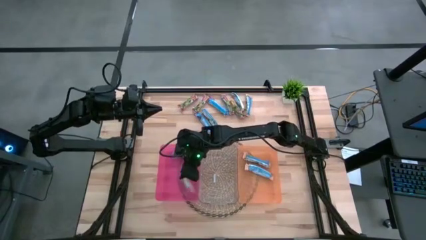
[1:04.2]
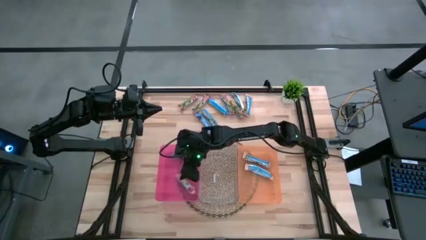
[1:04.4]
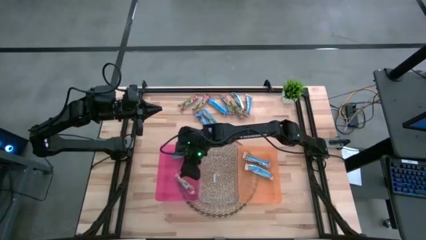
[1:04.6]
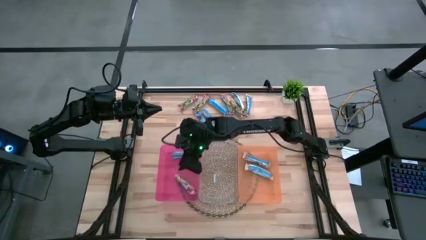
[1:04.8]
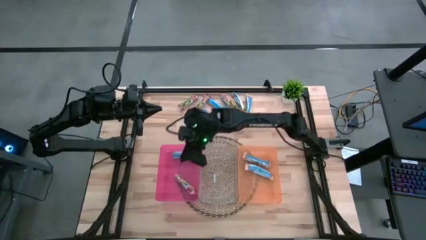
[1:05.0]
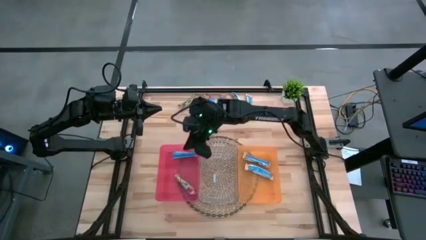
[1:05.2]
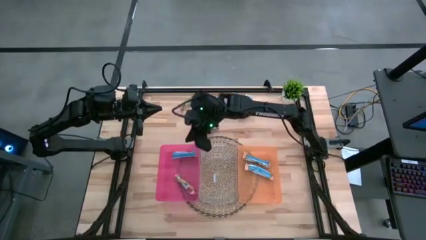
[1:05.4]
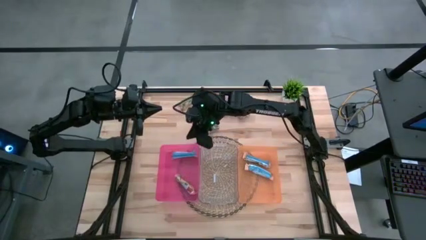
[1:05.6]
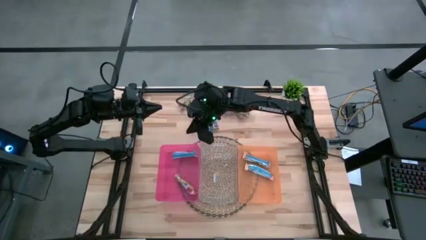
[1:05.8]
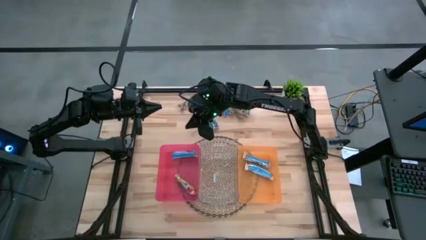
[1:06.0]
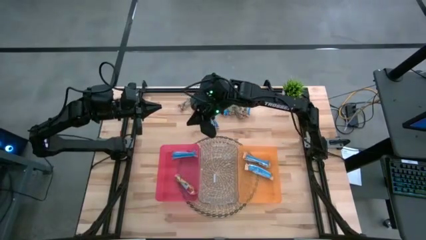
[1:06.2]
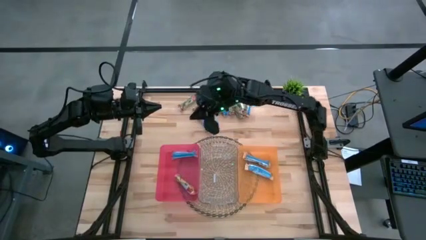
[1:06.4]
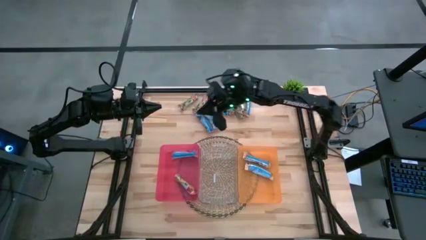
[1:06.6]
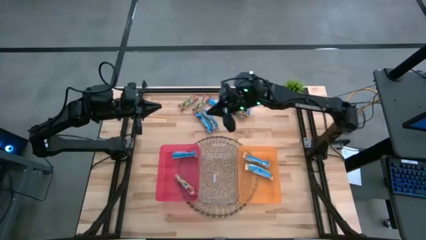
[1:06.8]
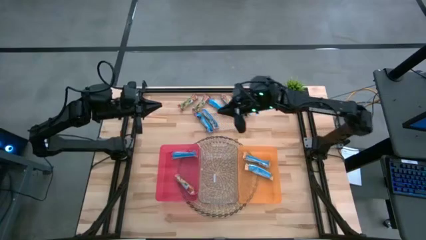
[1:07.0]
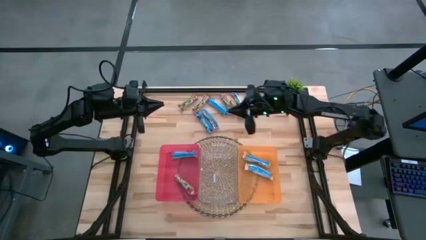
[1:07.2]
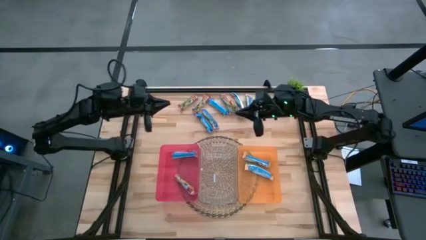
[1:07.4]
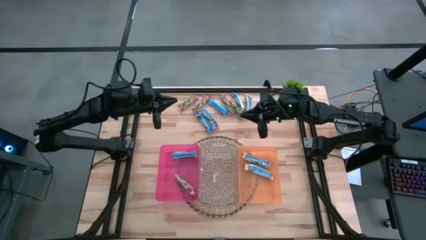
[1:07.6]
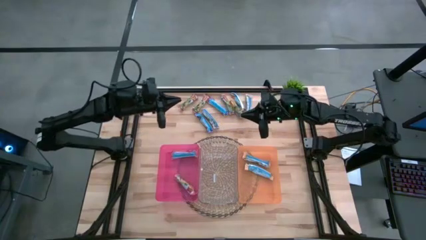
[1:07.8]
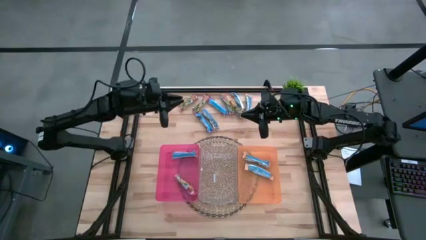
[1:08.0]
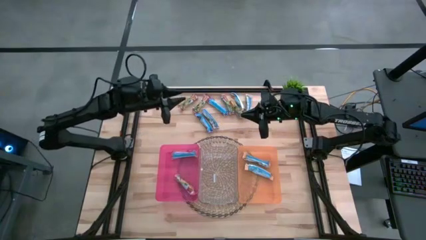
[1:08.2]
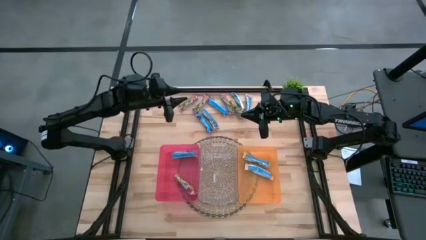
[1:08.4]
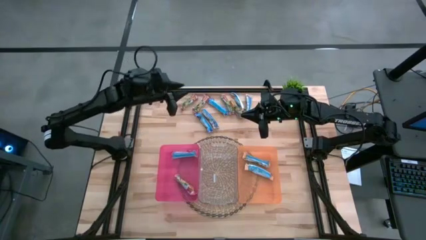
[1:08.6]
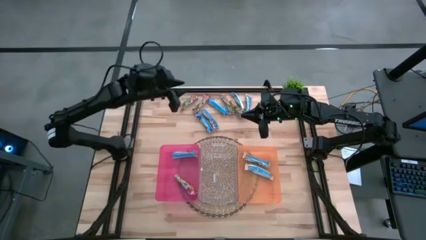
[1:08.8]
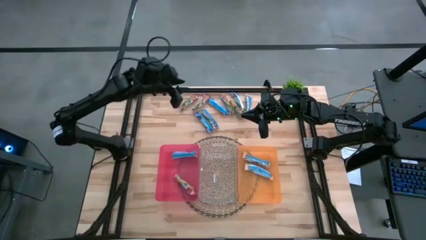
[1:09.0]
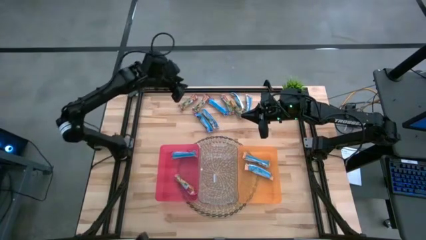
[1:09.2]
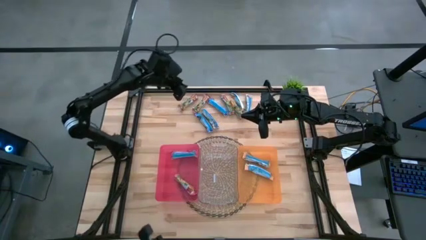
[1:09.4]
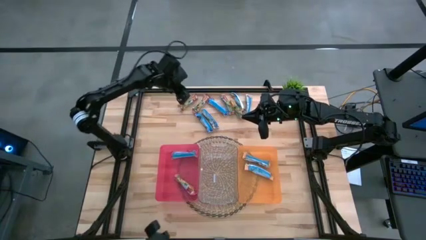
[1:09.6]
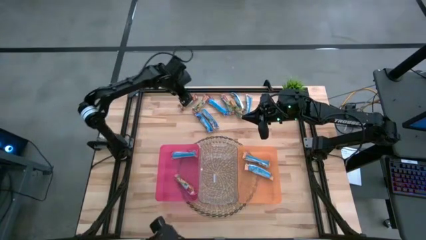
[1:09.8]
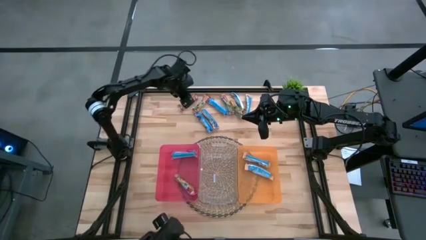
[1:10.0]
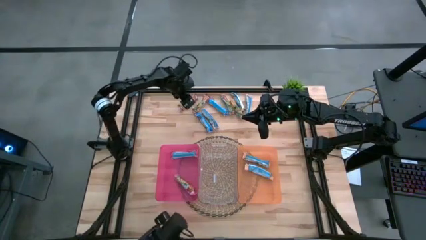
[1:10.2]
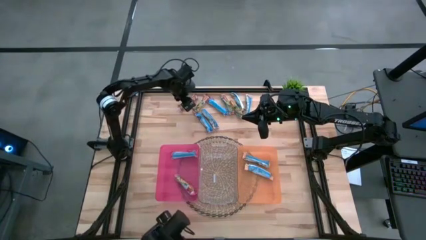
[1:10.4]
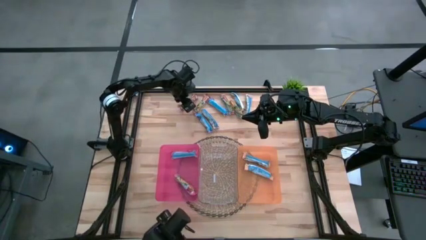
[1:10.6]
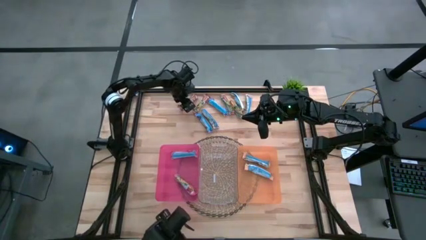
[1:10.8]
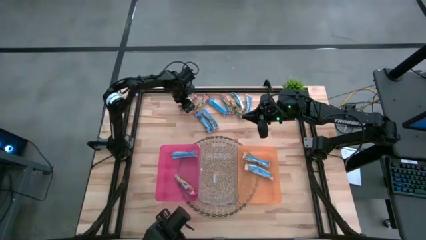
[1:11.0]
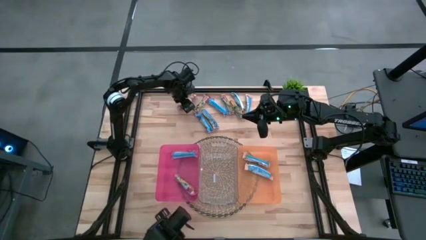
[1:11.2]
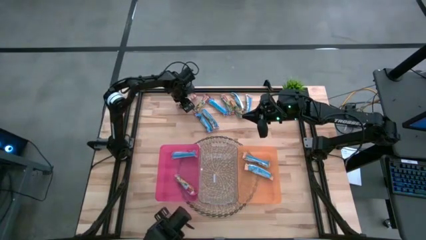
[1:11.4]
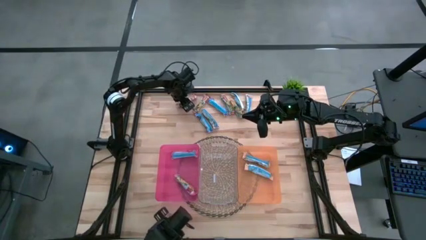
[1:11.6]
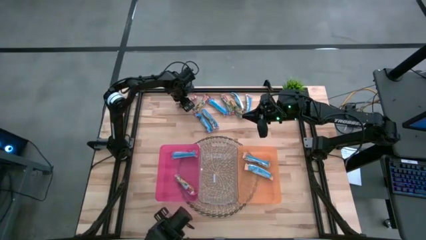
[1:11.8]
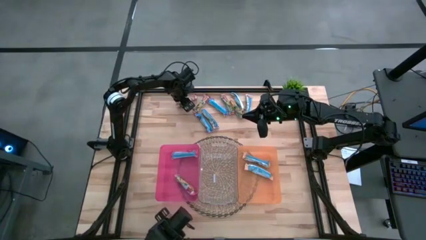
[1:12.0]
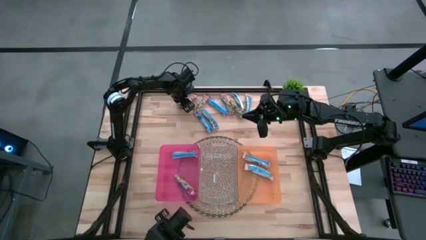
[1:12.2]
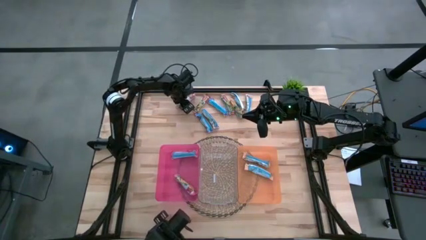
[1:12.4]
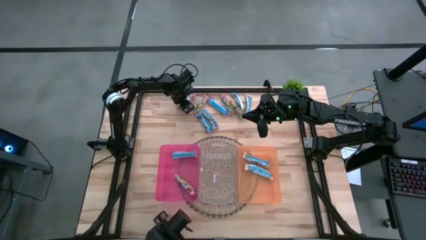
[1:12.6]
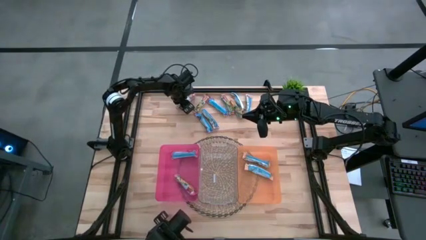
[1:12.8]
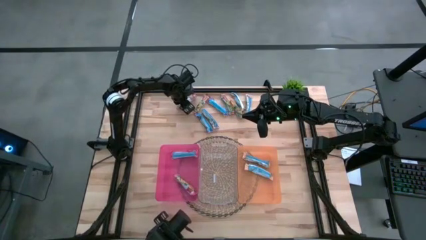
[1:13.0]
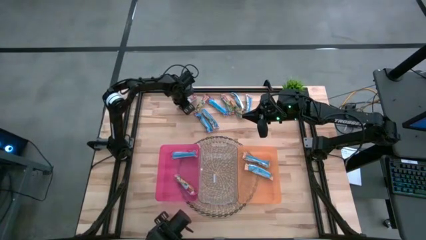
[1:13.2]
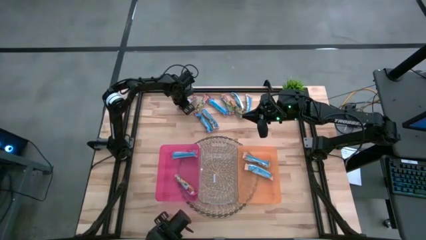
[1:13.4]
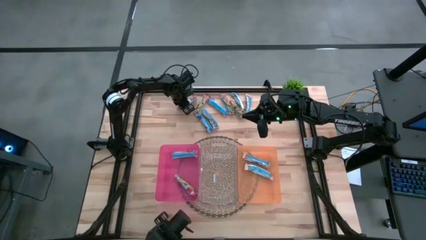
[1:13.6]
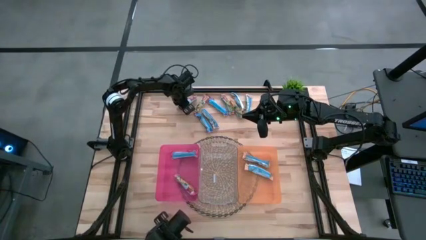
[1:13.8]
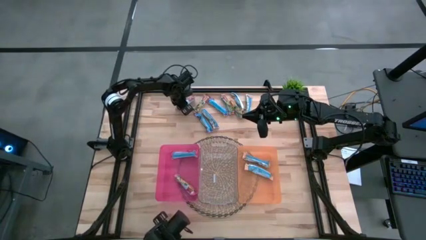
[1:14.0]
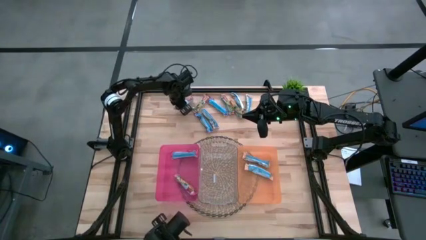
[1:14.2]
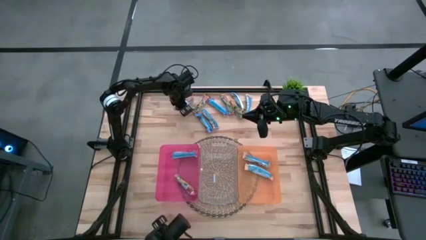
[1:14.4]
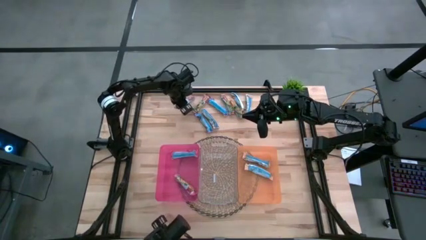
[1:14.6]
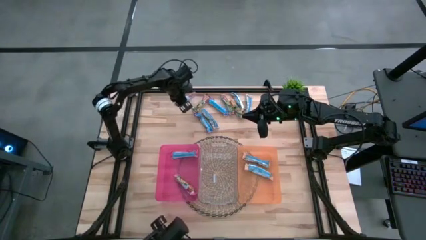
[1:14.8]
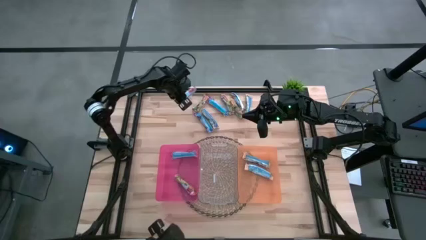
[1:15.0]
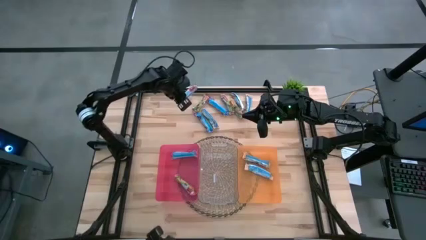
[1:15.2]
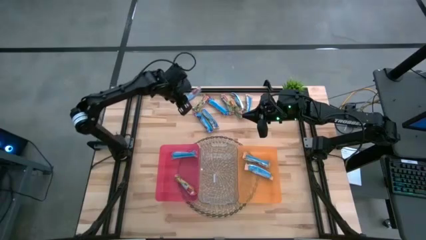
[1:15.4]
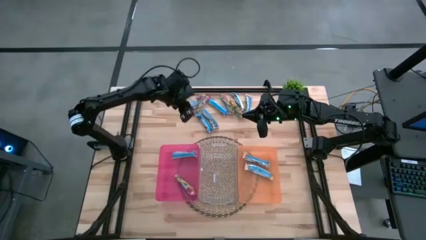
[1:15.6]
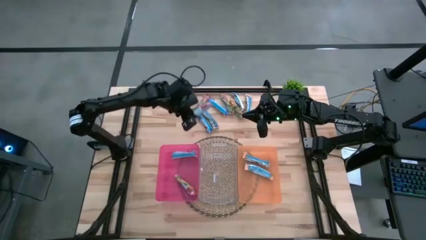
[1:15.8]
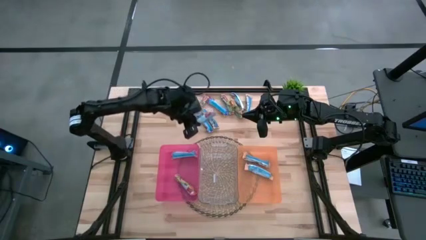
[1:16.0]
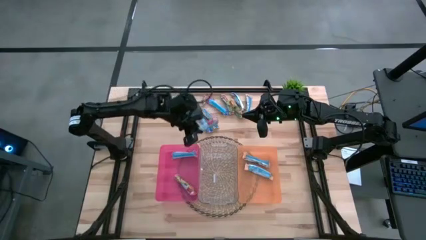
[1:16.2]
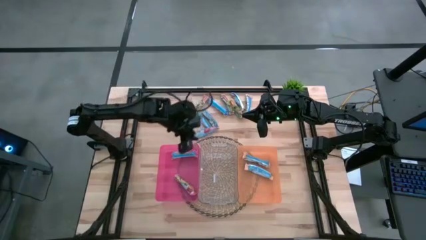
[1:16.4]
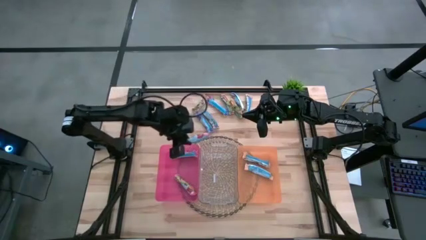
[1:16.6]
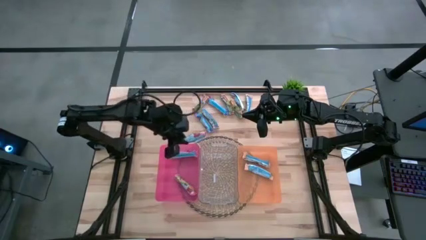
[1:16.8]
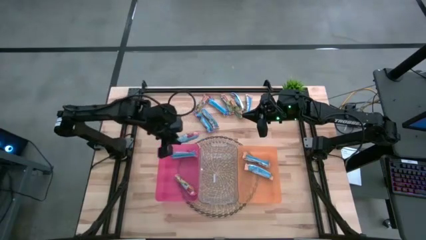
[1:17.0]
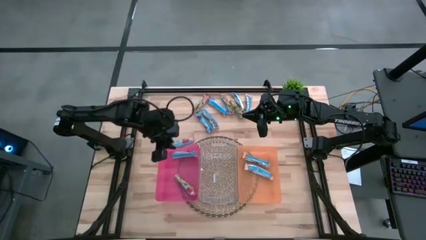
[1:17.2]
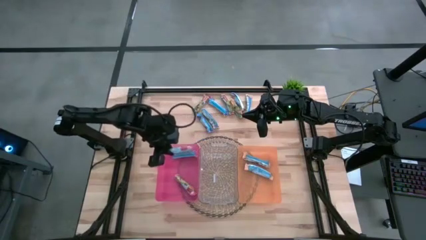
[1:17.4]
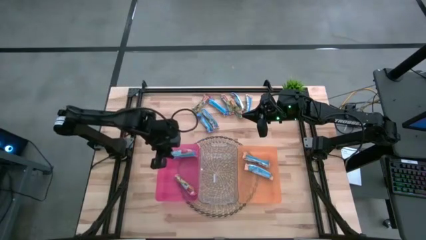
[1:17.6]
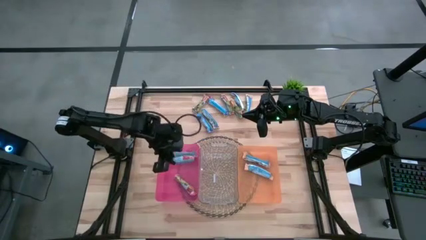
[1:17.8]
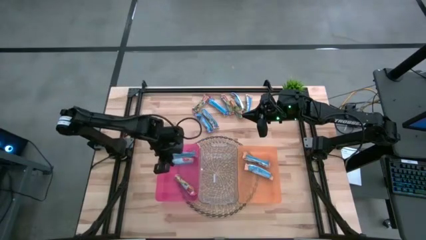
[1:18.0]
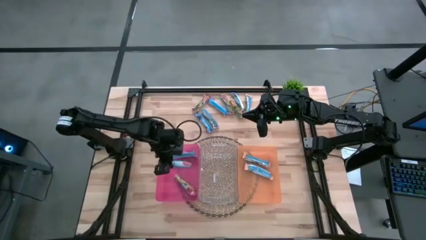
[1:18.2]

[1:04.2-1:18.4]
Task: Pick and place Granola Bars by type
Put the yellow granola bar into the orange bin
